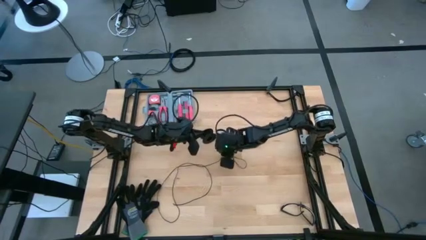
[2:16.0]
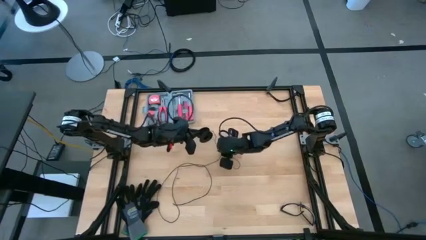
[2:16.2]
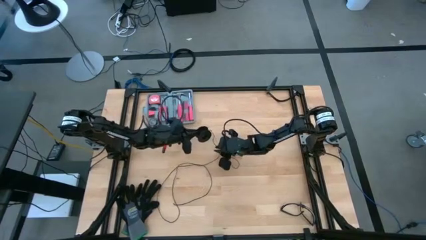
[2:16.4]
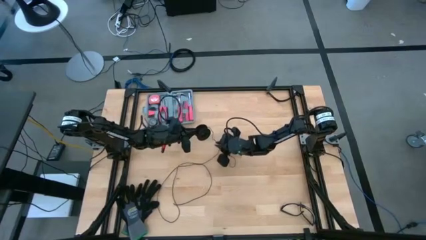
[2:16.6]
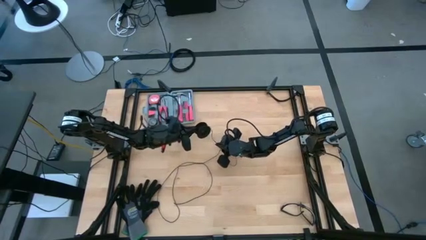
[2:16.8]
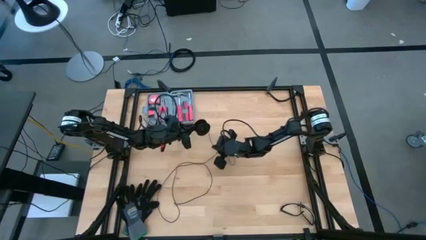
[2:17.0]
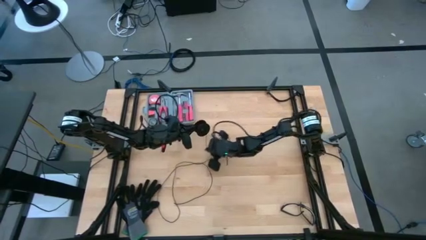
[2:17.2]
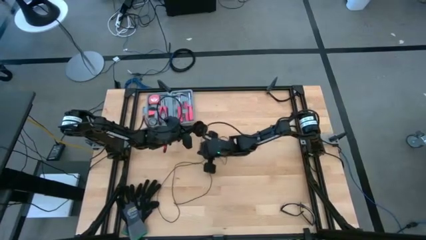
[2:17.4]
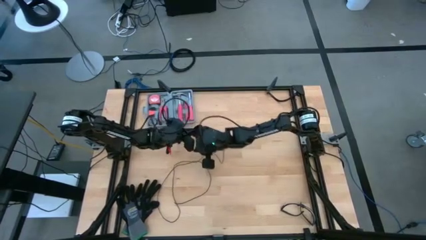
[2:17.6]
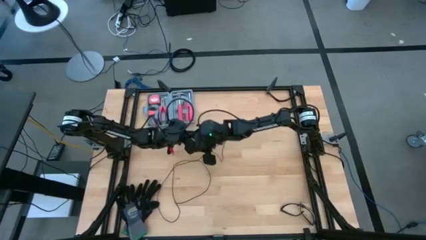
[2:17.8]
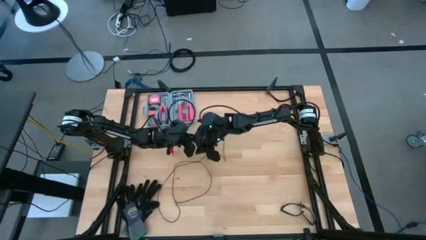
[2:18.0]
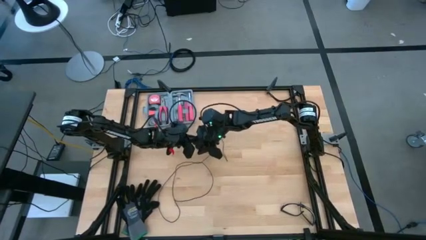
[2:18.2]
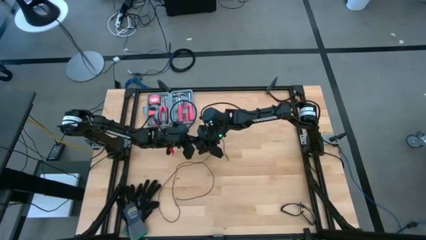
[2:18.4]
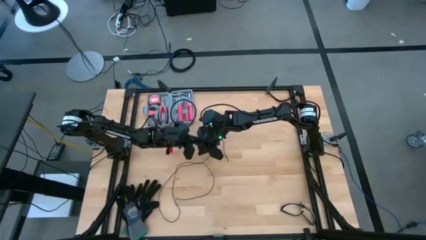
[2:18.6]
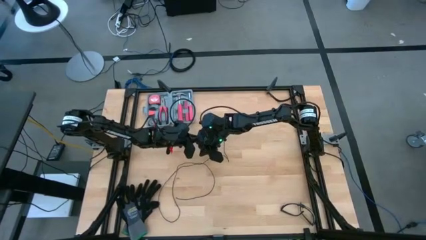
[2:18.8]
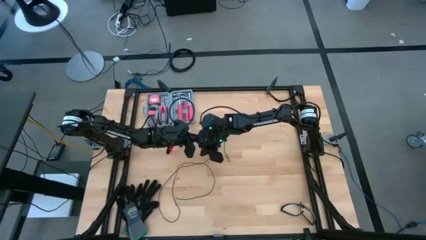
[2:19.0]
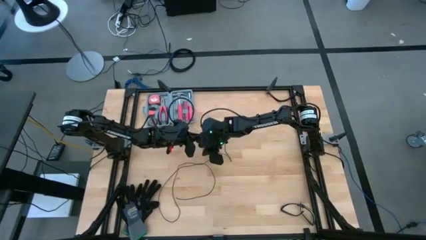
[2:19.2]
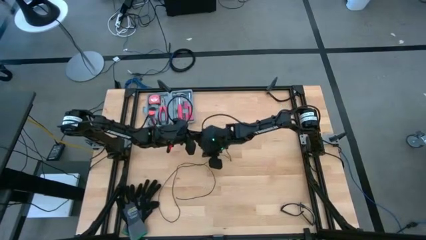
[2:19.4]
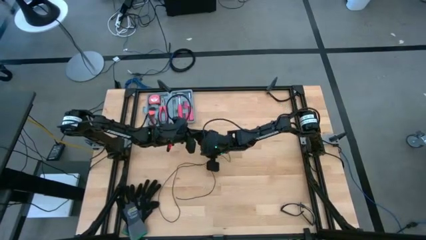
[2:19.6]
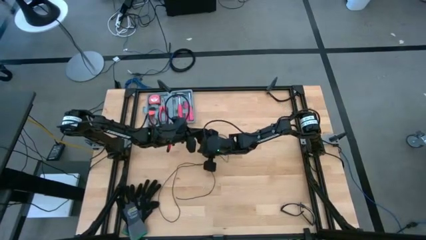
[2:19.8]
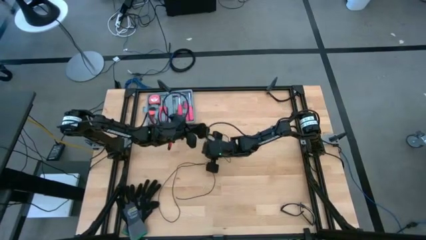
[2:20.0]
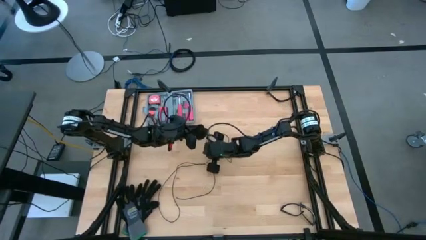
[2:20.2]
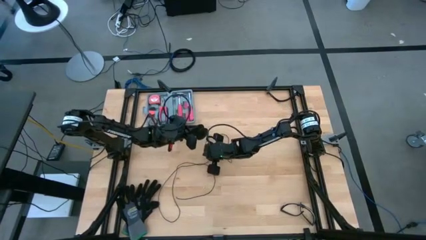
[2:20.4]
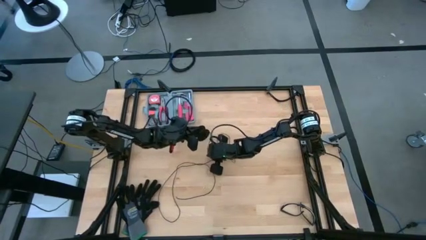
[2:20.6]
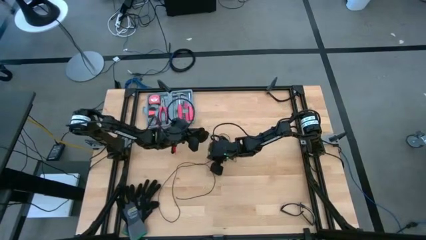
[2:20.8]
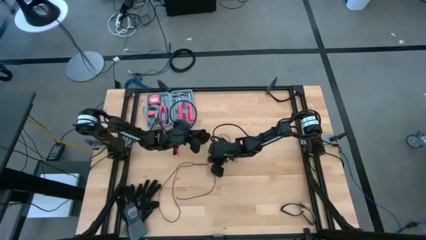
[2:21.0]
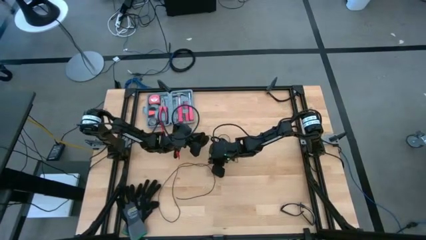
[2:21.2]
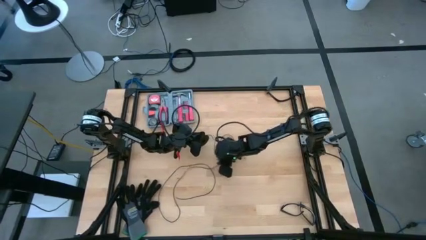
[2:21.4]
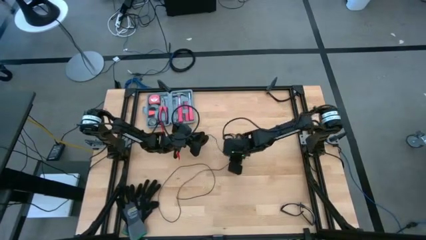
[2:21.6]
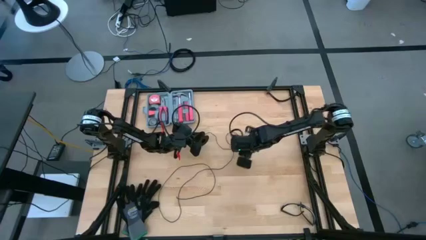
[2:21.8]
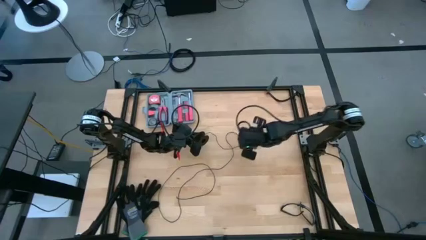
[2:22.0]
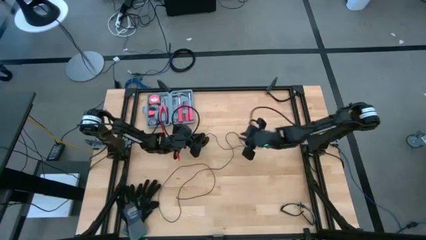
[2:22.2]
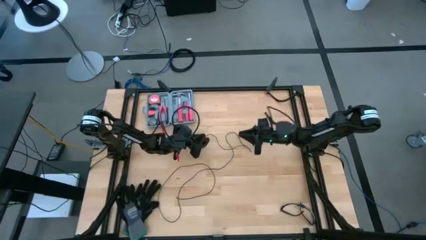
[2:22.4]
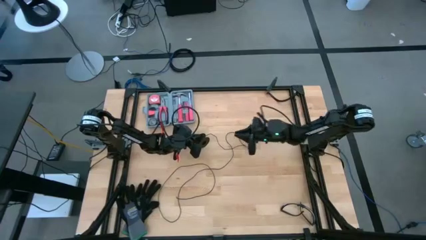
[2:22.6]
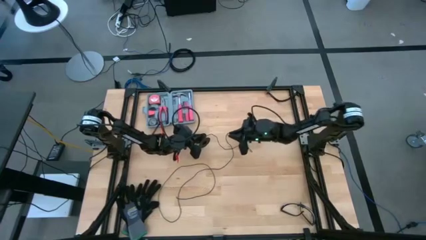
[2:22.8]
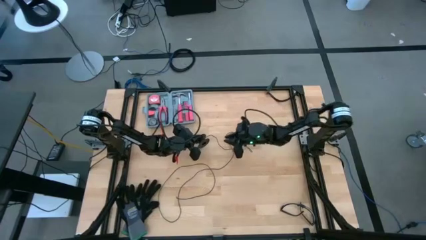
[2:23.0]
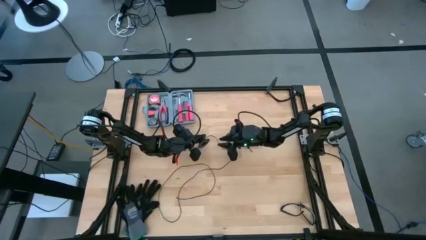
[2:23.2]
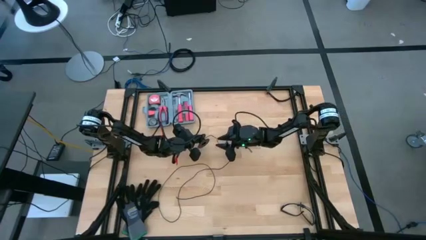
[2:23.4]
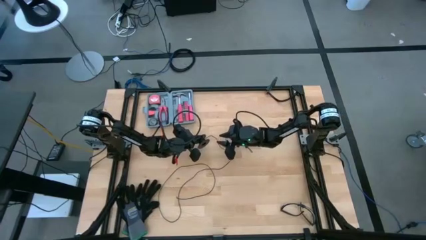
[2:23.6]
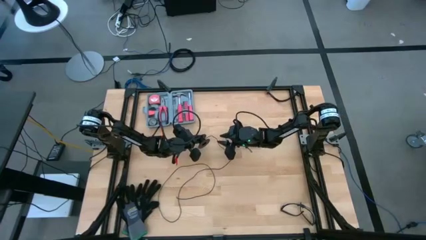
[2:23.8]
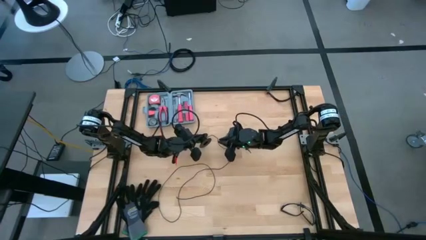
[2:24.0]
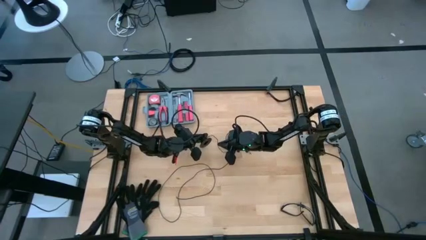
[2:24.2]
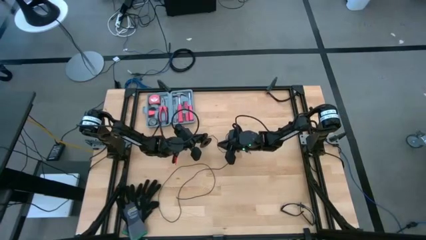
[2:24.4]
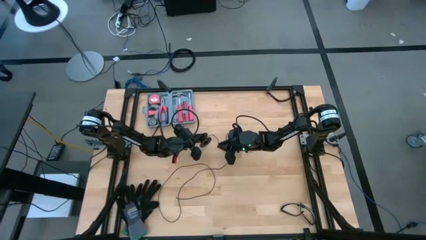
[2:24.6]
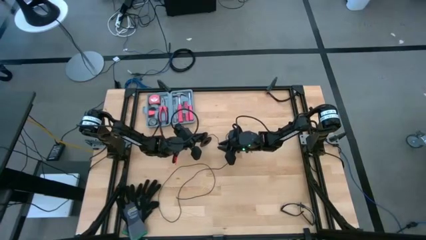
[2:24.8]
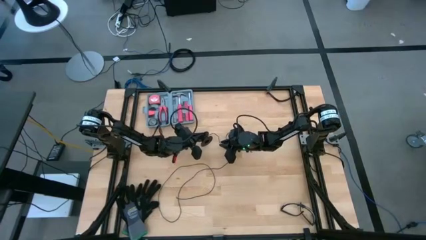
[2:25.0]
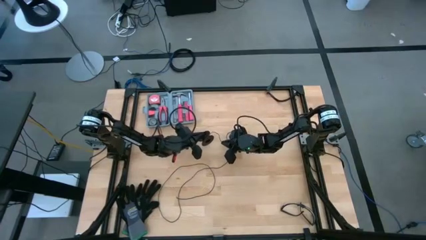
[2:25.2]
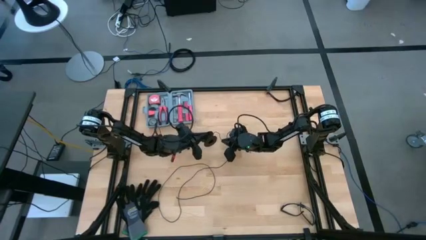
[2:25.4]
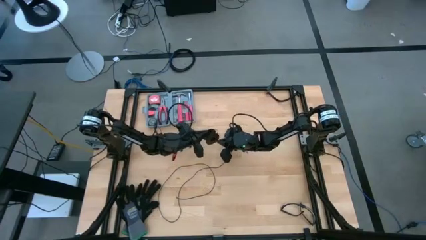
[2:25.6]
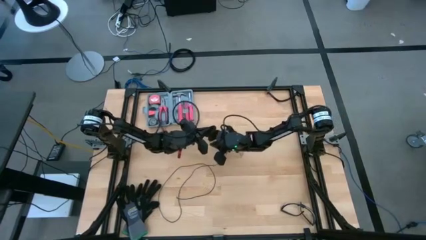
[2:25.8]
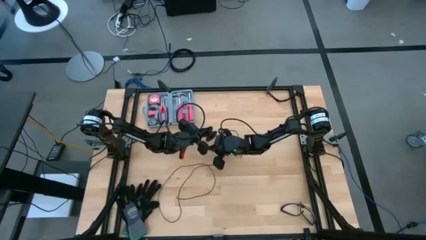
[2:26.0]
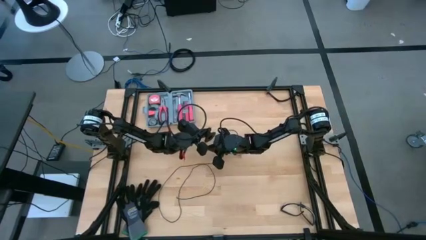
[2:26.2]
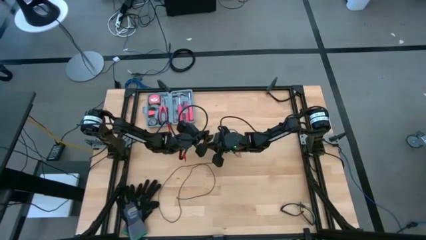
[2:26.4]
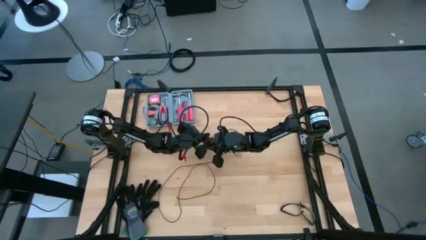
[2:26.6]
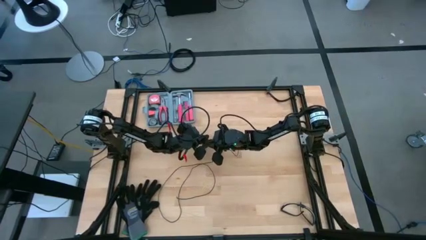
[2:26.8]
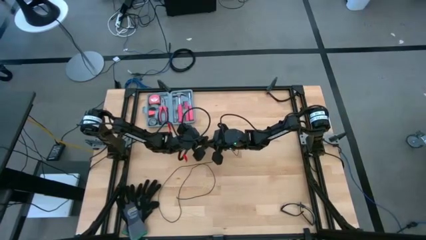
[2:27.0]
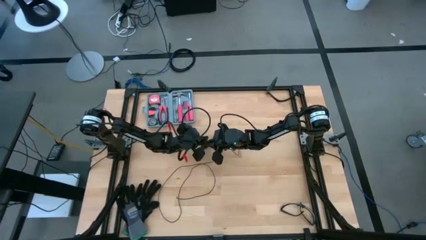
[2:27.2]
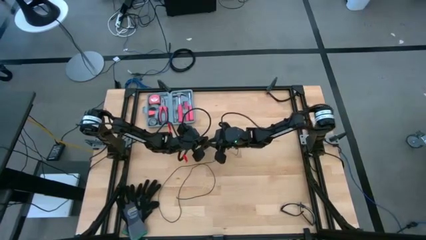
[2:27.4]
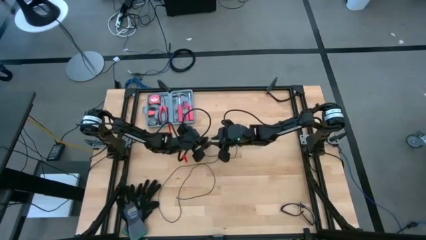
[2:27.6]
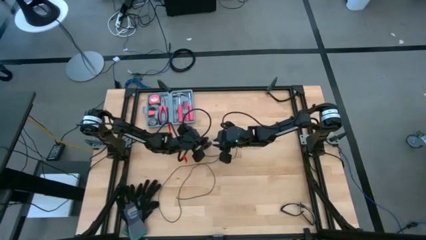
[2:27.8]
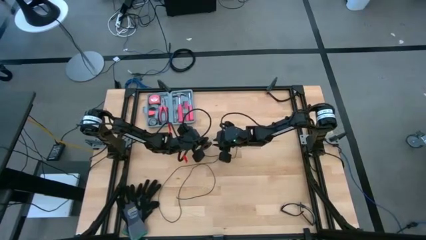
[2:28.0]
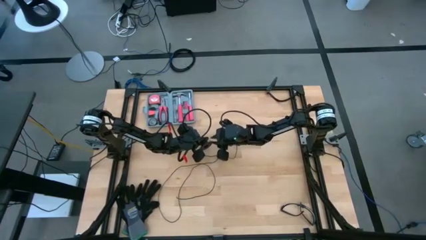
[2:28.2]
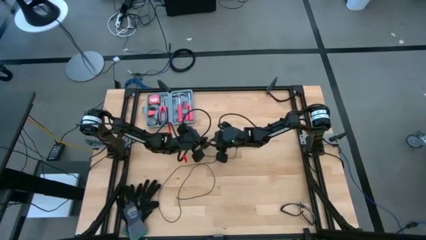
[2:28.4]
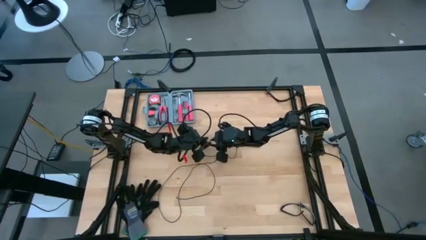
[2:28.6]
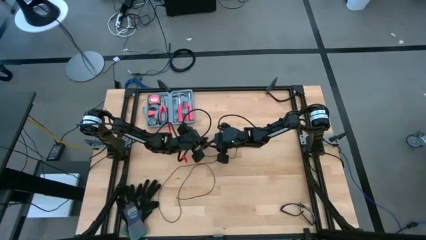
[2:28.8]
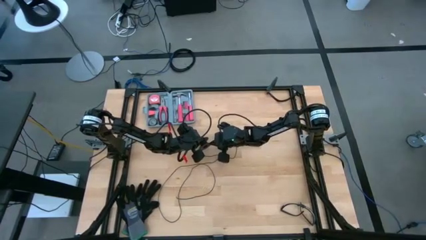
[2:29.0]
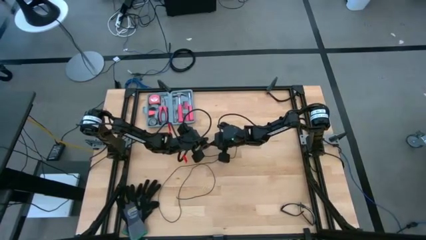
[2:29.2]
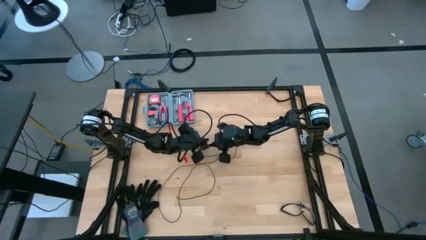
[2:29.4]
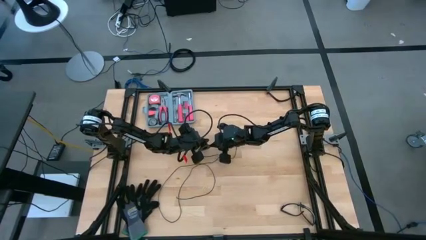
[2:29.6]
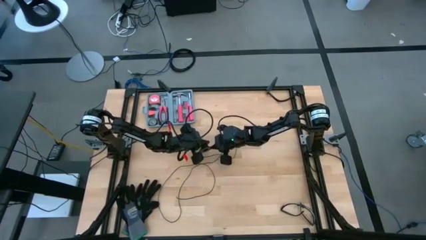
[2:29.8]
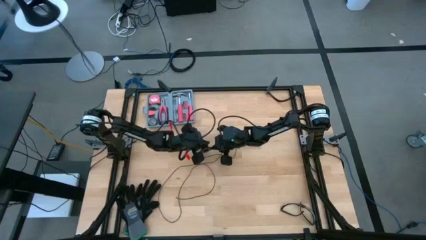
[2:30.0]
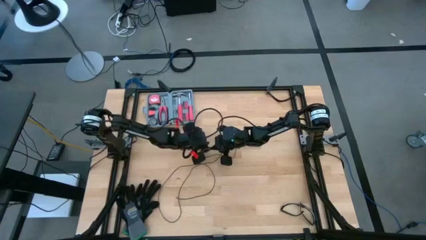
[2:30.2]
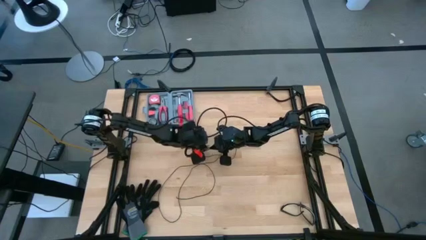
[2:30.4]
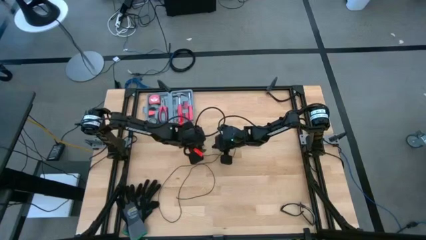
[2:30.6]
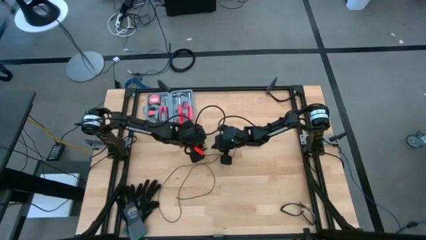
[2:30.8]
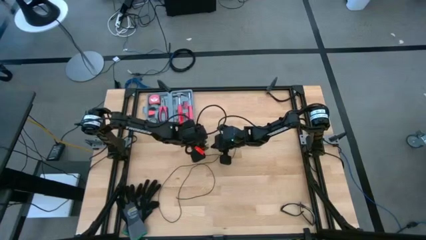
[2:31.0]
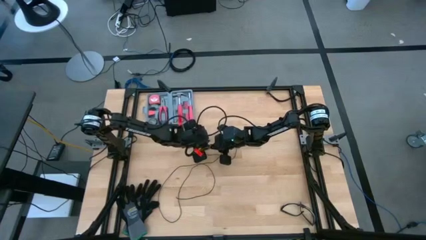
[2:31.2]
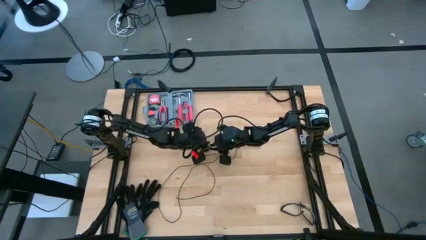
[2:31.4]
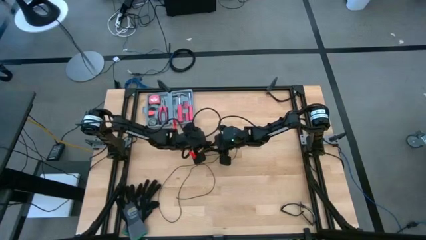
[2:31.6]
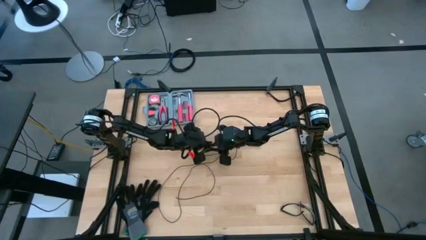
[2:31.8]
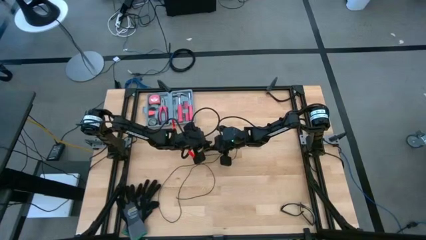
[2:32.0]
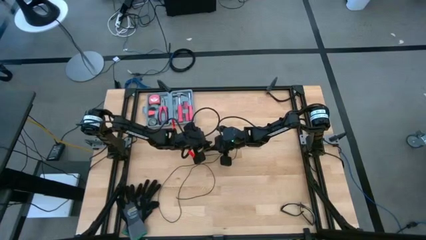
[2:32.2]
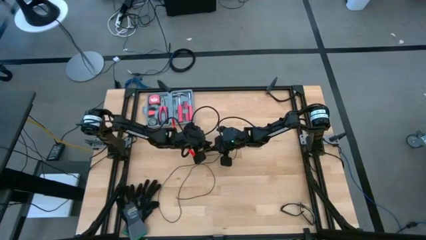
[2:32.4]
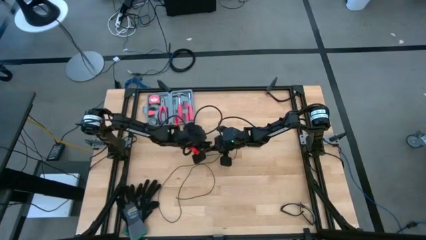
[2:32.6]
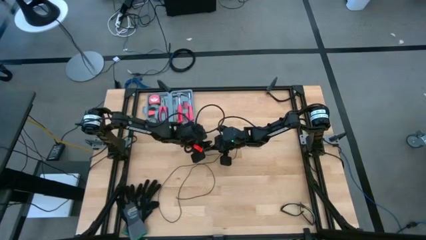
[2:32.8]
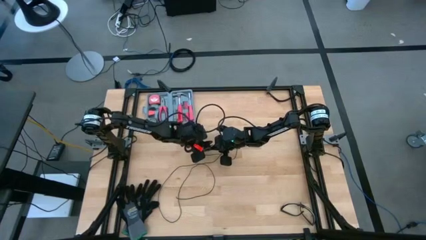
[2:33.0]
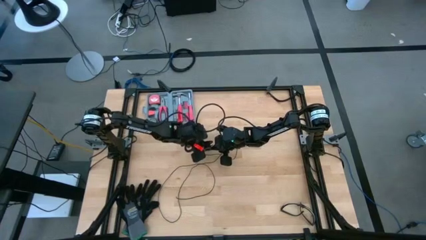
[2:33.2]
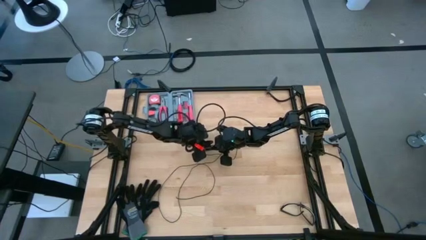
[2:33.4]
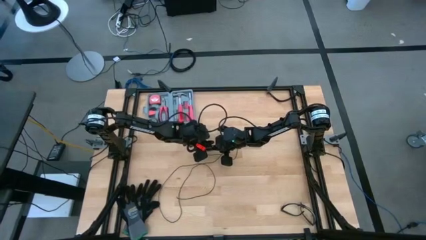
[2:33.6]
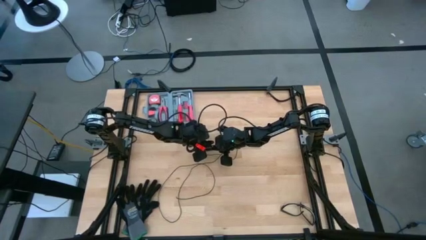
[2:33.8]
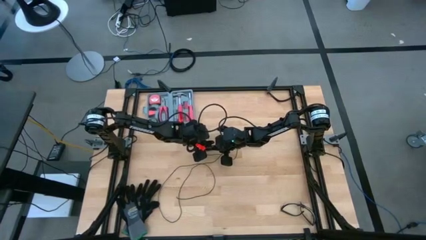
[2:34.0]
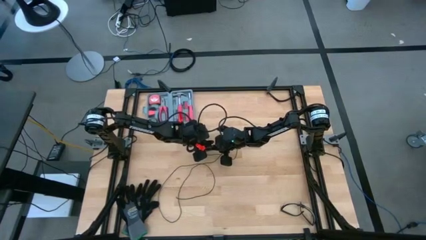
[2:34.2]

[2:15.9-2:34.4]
Task: Coil cords
Coil the black wire onto the spool
